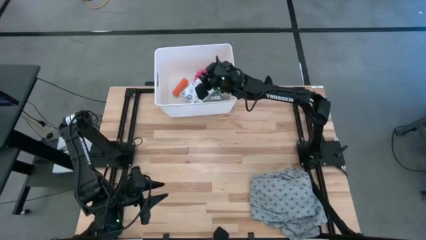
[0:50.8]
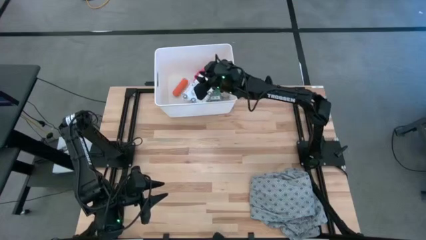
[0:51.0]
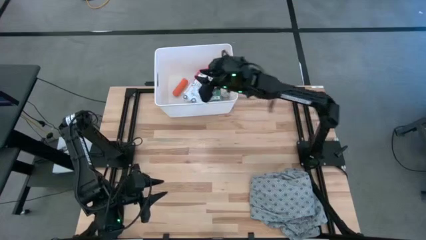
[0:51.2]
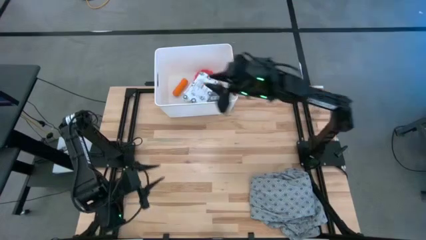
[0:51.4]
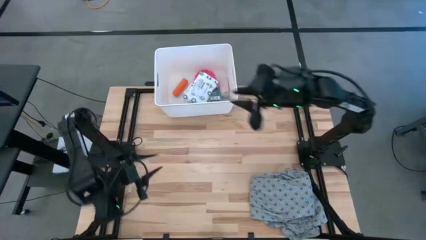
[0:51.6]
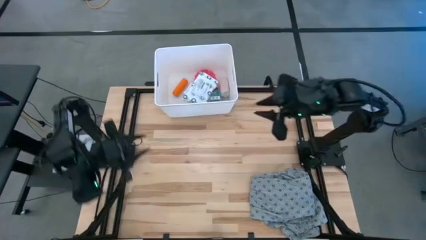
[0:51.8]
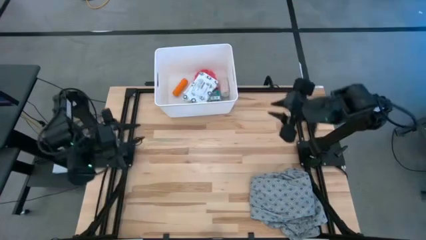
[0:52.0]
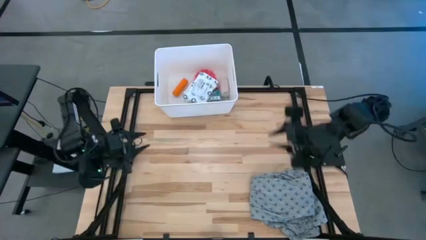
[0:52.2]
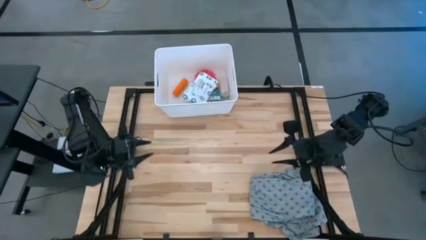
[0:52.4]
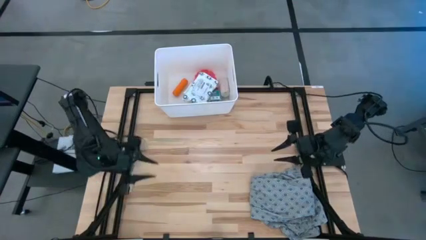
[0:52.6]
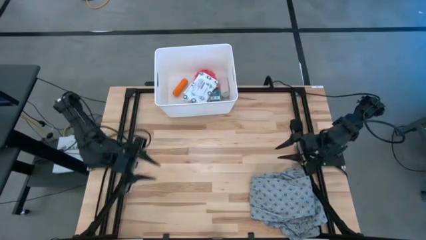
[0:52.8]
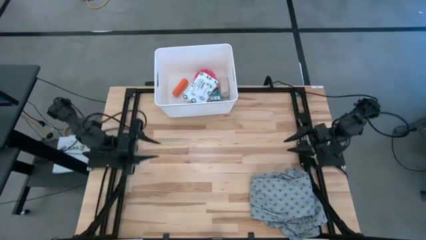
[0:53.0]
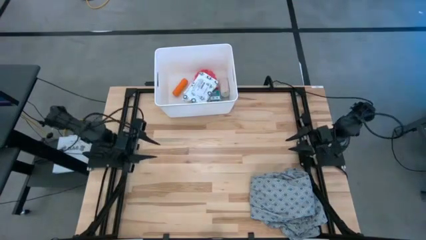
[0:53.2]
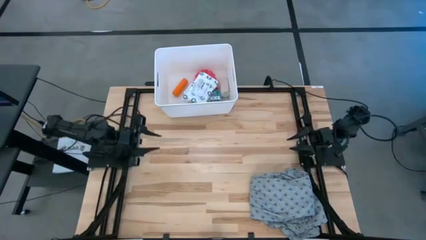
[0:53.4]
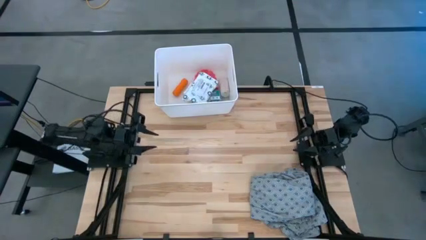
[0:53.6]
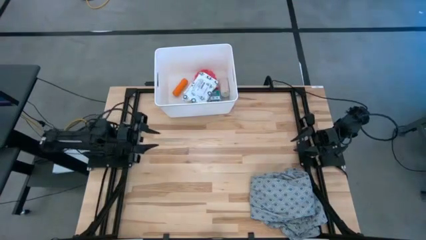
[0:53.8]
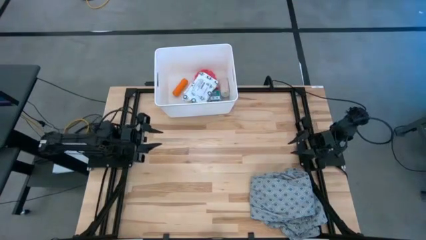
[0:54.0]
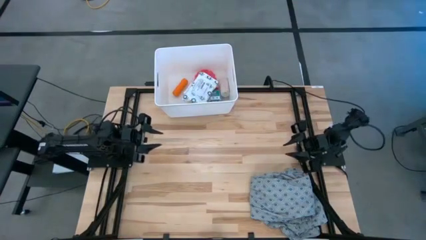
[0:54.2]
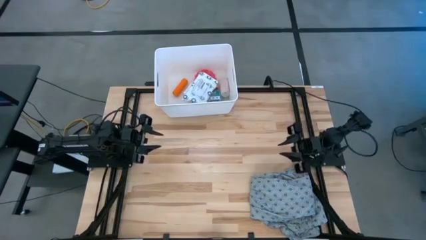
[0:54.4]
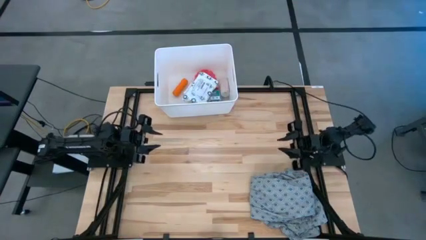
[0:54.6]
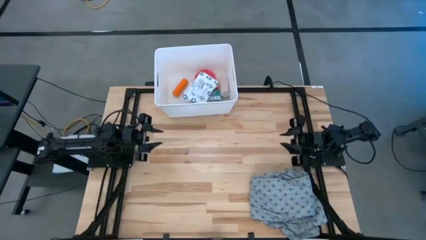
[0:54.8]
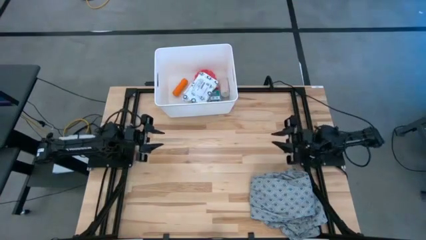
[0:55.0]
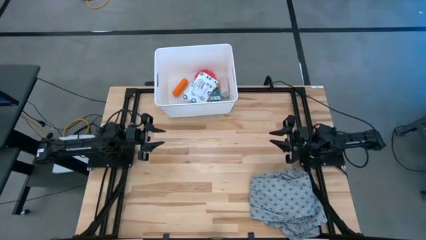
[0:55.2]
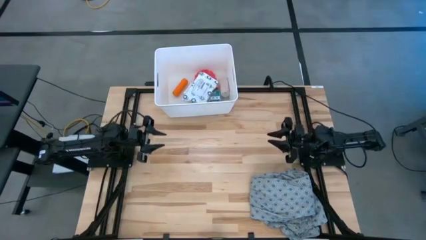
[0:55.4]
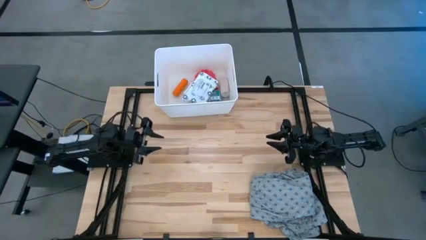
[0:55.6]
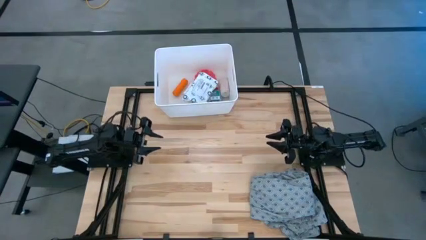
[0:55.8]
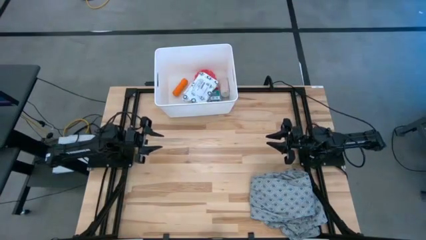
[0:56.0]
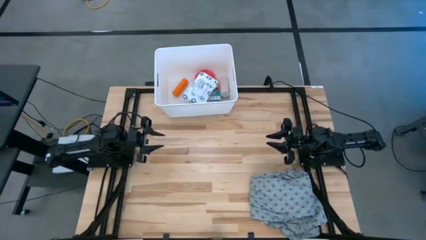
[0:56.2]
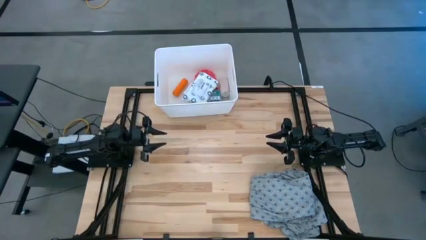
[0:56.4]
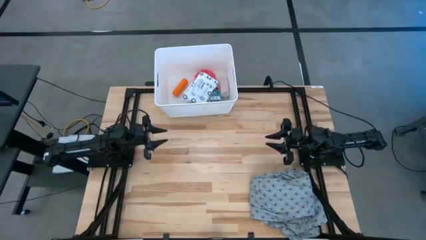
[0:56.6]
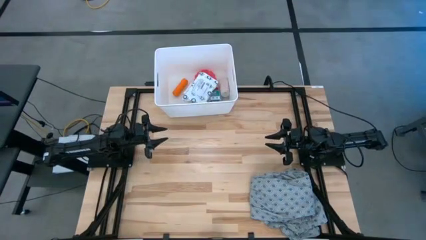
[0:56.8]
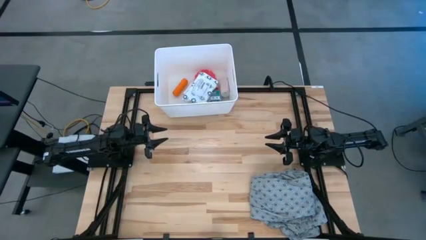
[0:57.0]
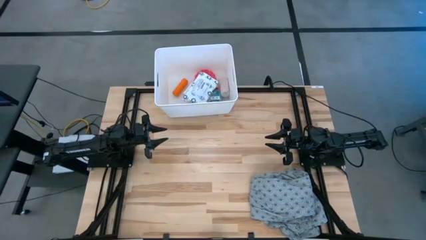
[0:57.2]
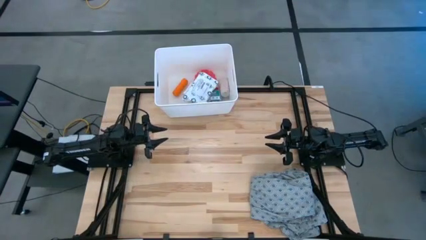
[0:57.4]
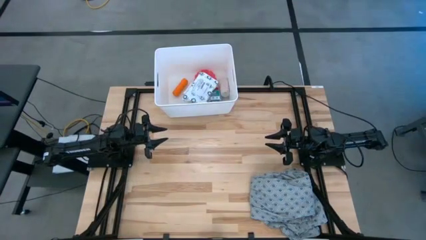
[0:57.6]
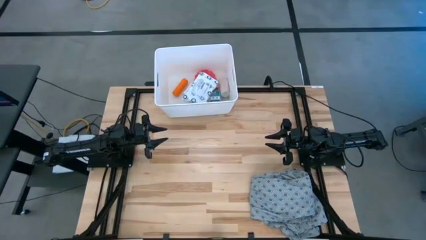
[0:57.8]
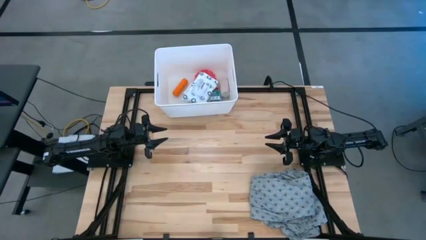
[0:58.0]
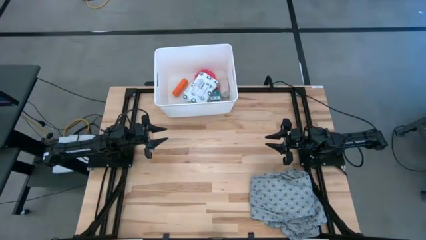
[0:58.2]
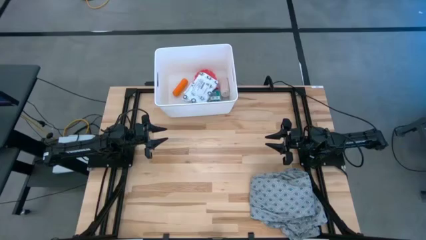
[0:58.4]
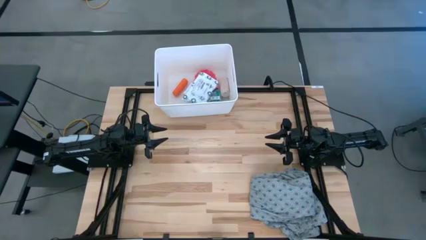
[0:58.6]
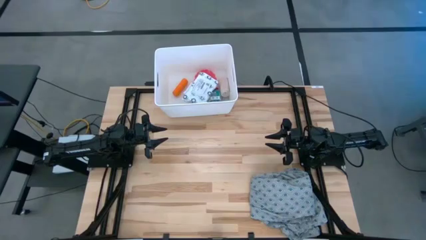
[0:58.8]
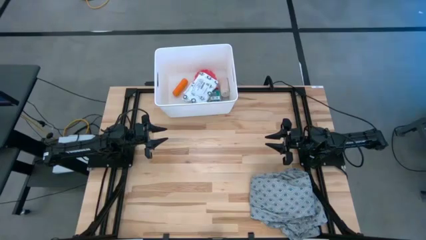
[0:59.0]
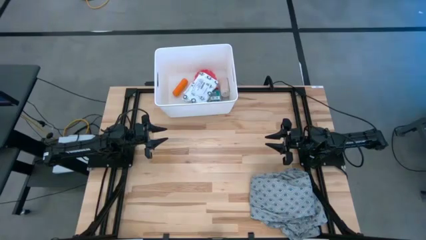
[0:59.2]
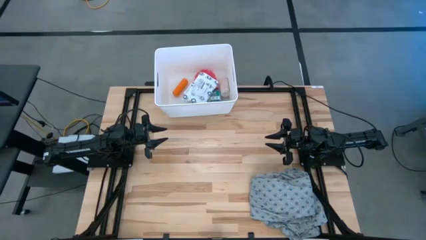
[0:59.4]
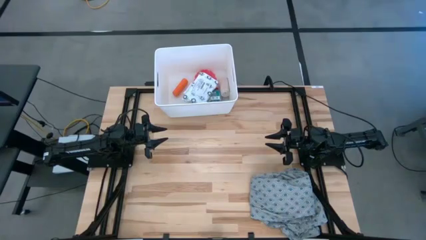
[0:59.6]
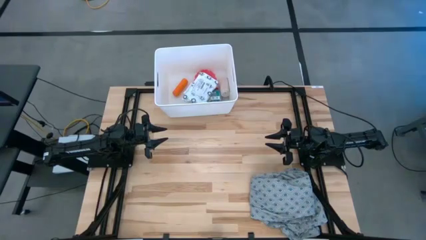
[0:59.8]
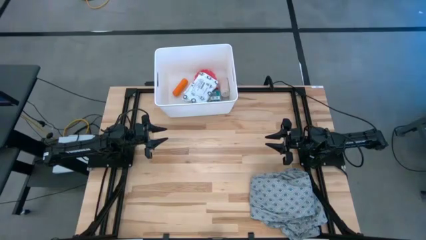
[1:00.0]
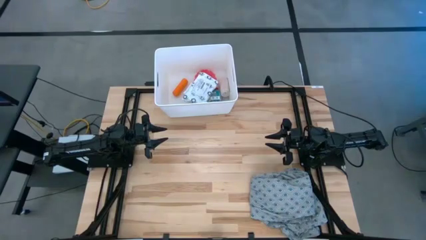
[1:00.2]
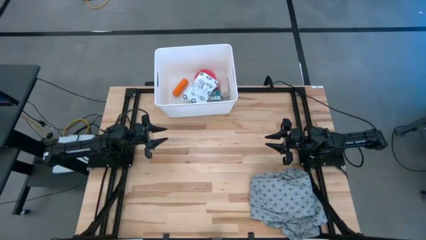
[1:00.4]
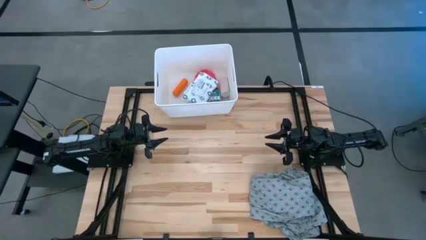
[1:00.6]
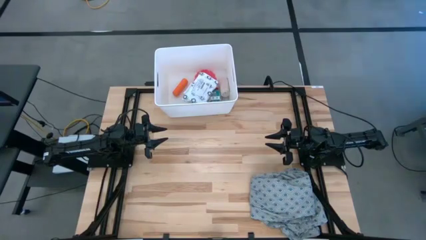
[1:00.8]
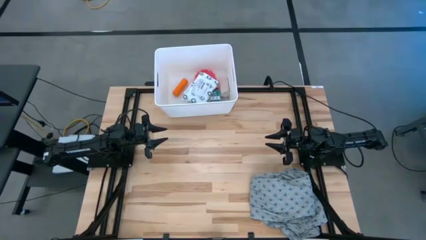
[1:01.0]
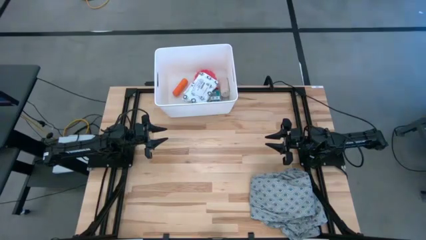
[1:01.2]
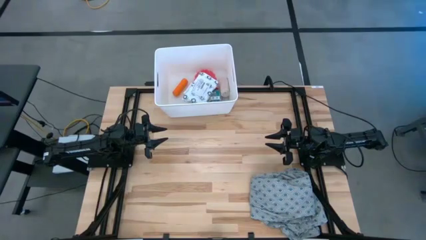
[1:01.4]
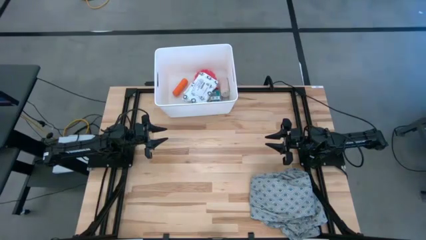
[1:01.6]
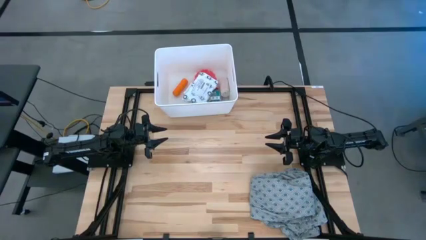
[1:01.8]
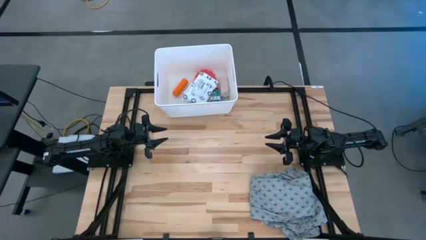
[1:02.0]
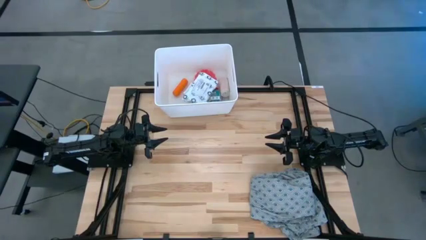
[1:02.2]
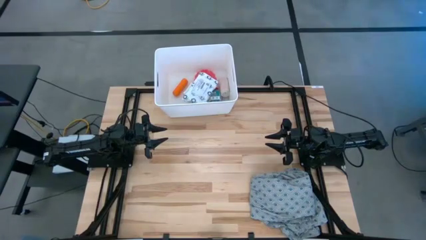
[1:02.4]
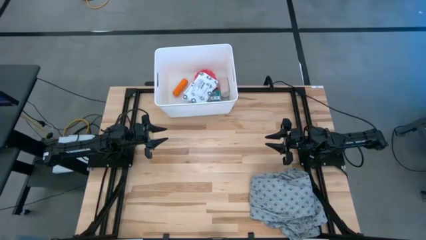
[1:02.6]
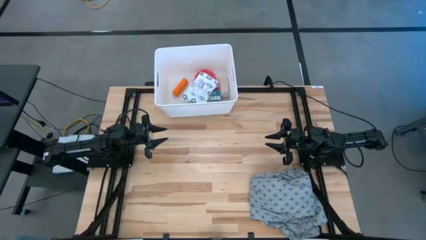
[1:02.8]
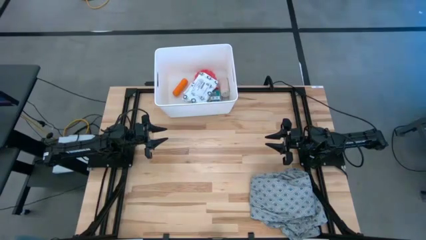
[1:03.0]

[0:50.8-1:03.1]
Task: Pick & place medical supplies in basket/bin
Return to Home Position

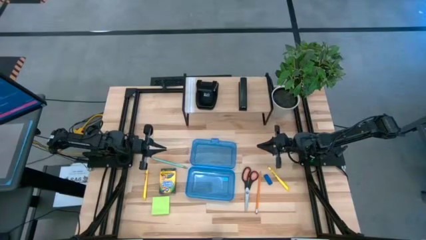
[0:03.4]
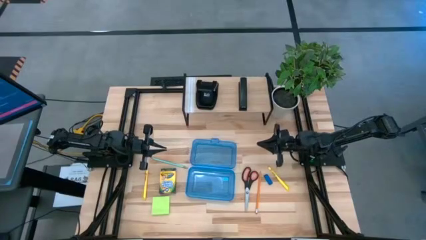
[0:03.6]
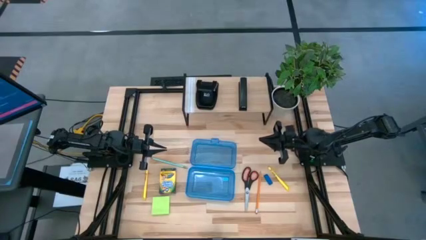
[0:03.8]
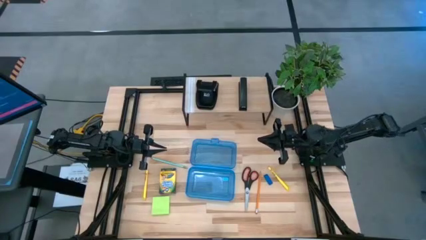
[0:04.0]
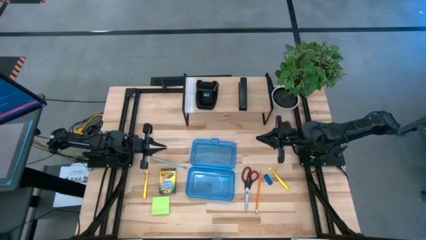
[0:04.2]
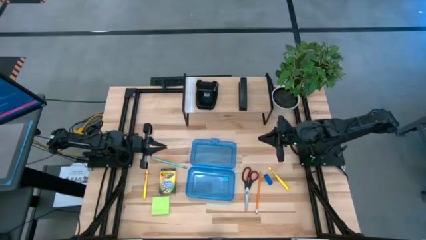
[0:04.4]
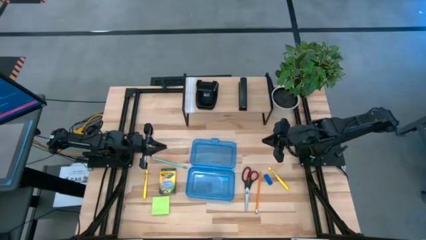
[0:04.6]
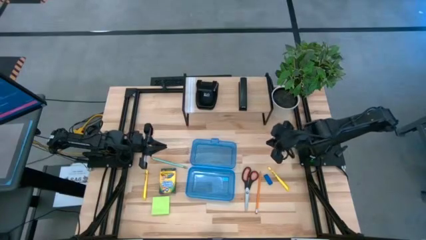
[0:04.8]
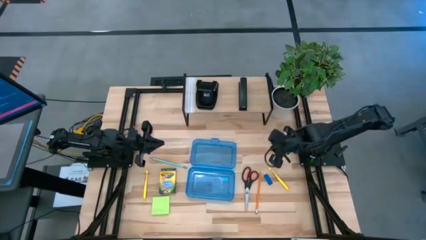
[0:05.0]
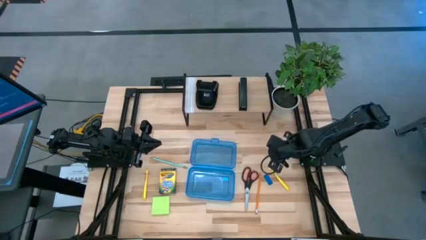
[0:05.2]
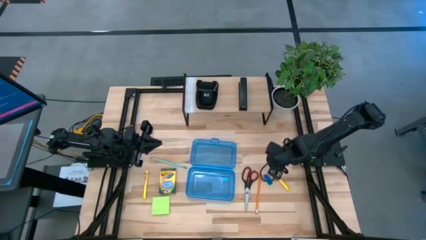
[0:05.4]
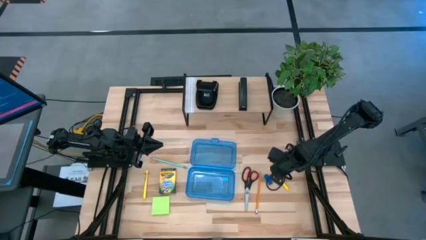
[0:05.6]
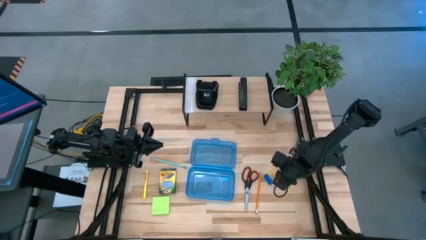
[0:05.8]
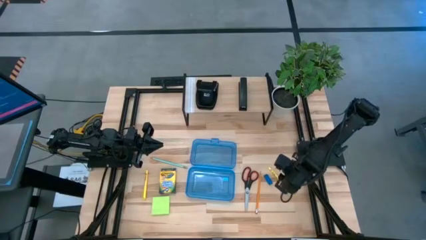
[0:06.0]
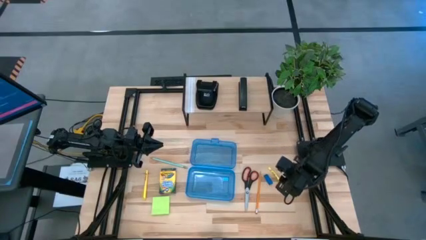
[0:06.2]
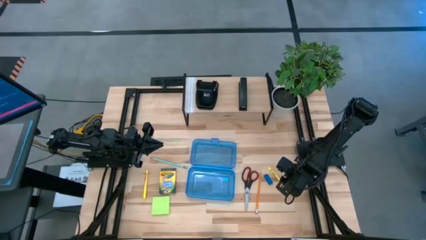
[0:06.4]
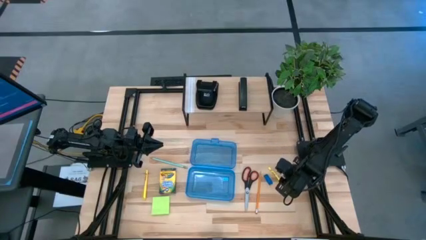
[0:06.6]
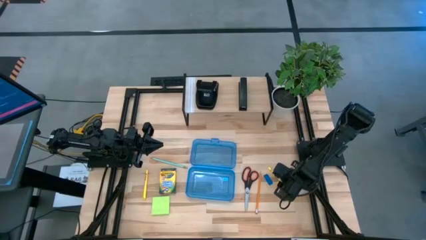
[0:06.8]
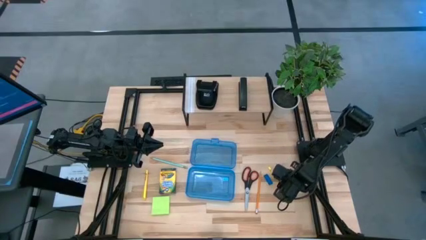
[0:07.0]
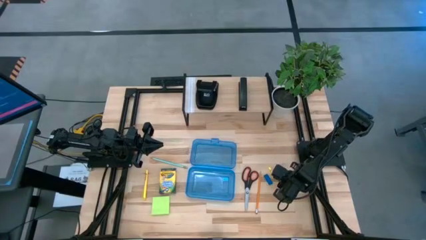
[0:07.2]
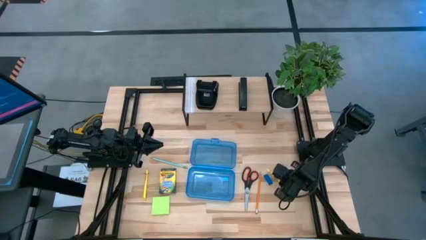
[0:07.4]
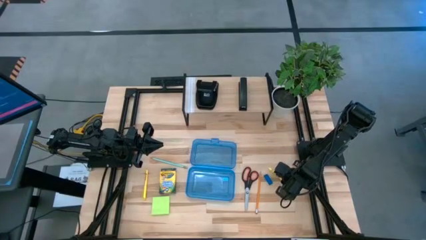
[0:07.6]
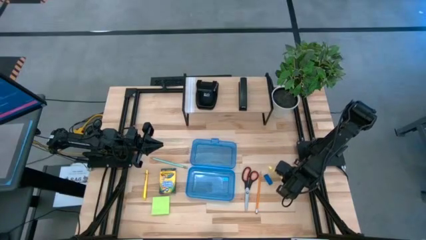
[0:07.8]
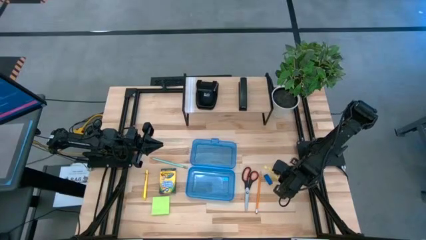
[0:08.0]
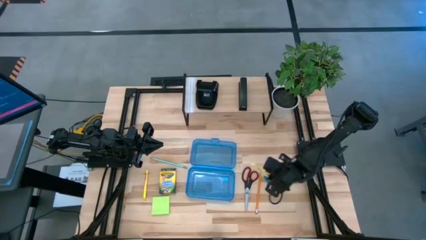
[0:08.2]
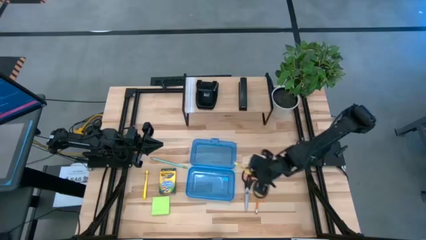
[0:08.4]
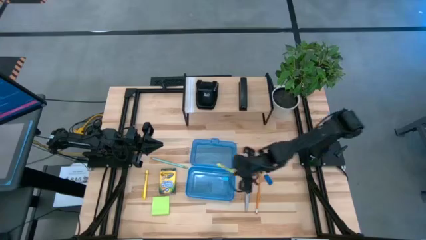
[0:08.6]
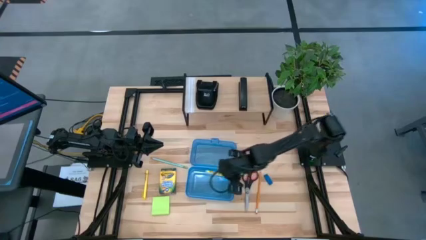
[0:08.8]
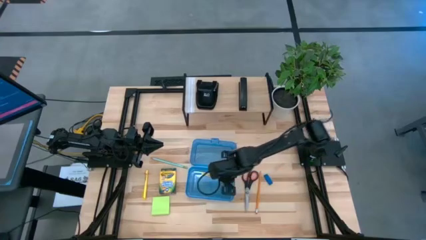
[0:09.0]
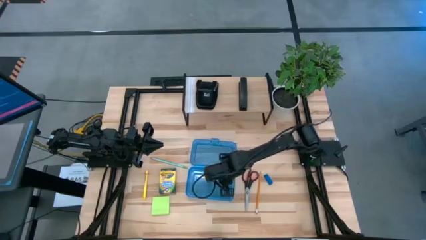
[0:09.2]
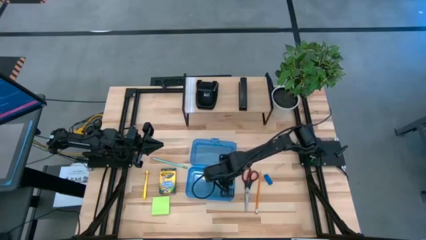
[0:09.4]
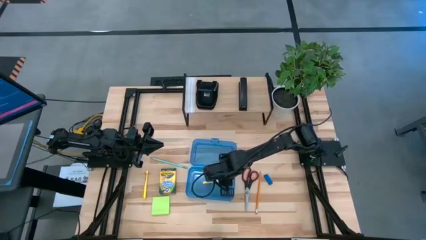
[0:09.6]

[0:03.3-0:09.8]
Task: Pack school essentials
Put the yellow pen into the blue supply box
